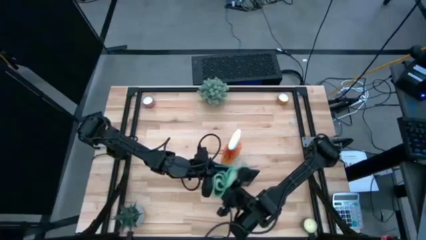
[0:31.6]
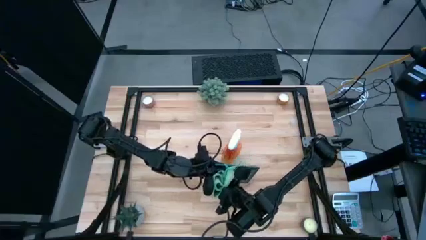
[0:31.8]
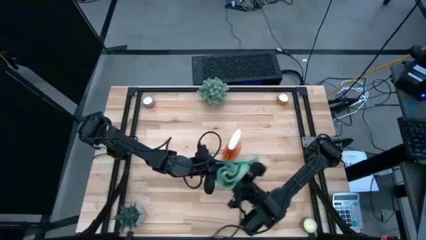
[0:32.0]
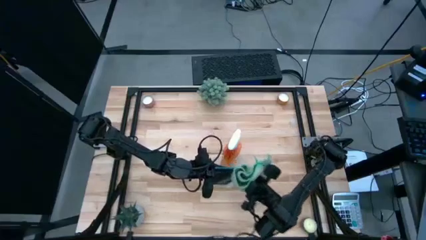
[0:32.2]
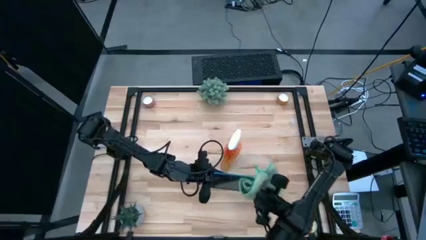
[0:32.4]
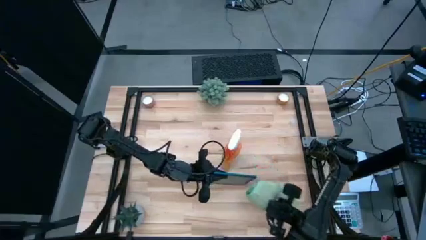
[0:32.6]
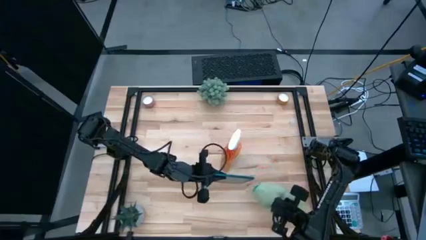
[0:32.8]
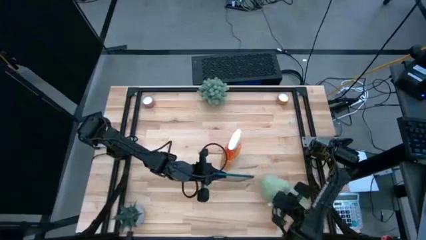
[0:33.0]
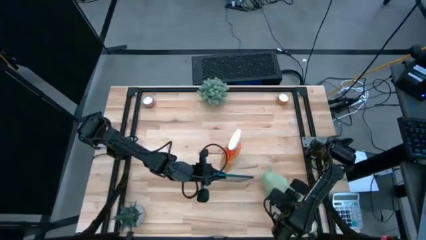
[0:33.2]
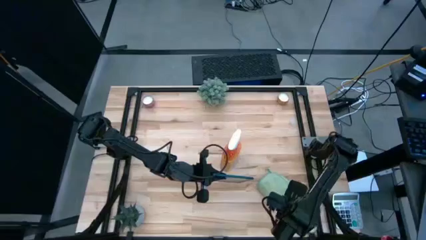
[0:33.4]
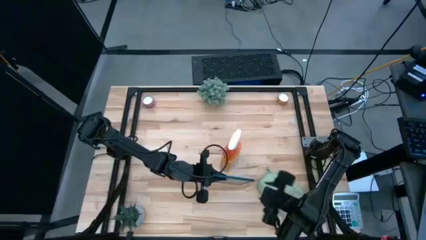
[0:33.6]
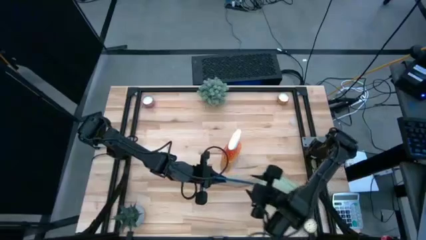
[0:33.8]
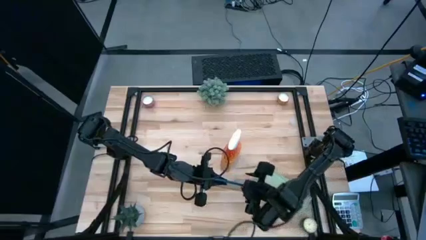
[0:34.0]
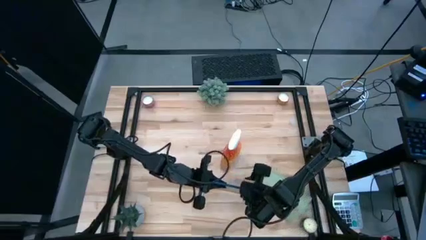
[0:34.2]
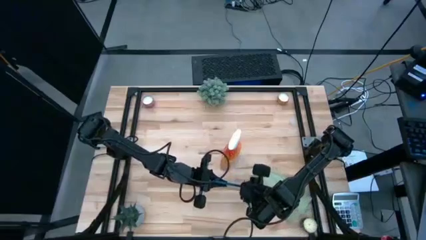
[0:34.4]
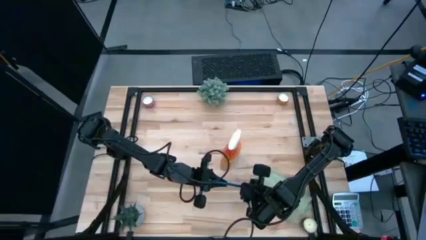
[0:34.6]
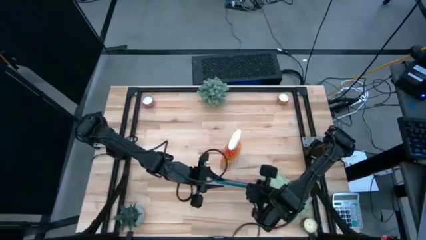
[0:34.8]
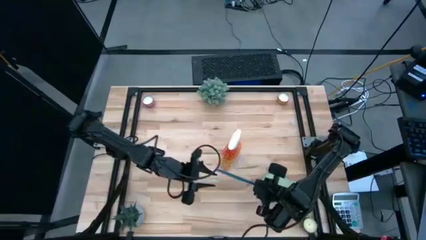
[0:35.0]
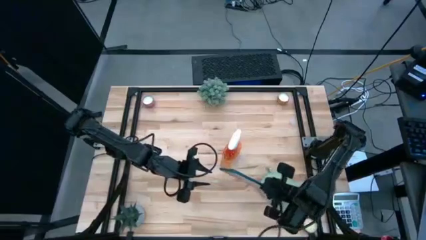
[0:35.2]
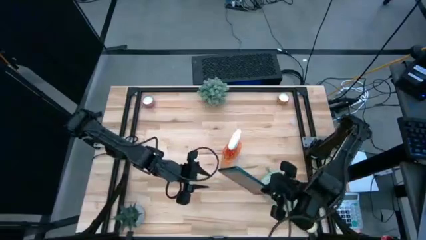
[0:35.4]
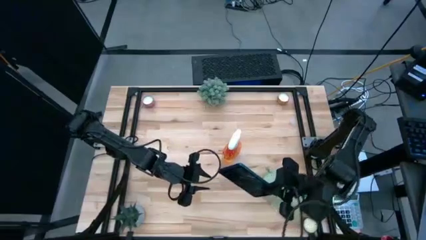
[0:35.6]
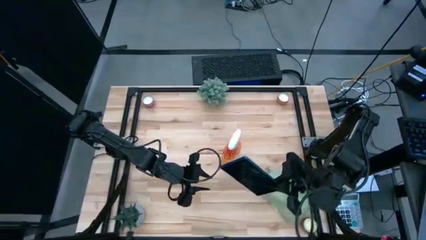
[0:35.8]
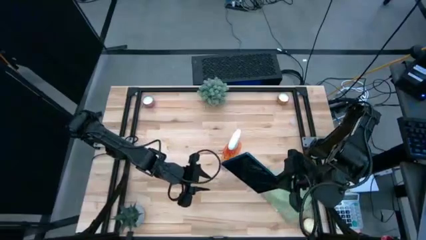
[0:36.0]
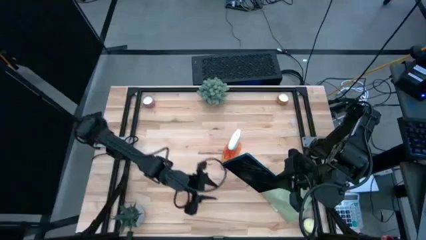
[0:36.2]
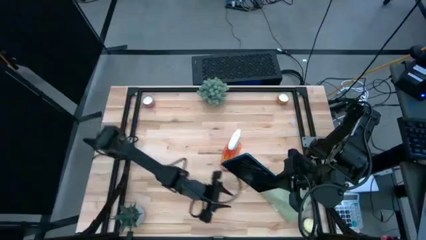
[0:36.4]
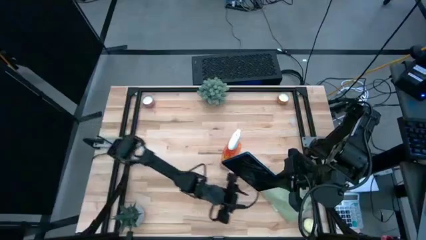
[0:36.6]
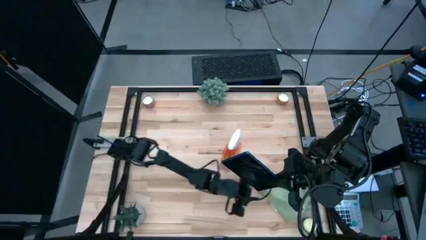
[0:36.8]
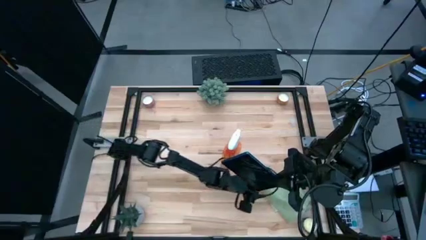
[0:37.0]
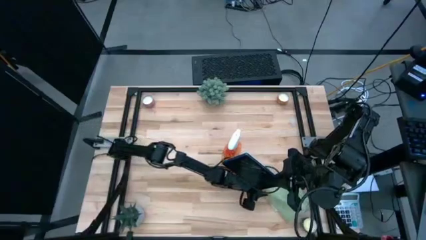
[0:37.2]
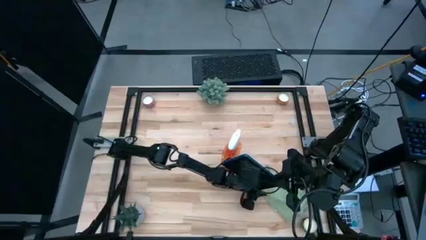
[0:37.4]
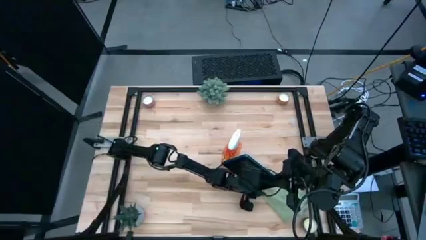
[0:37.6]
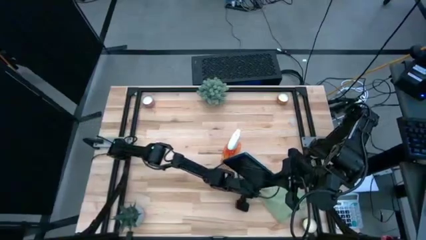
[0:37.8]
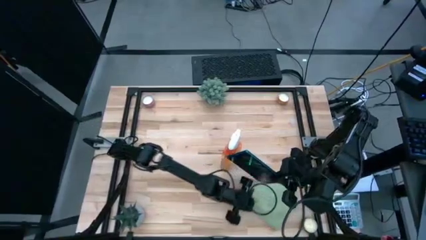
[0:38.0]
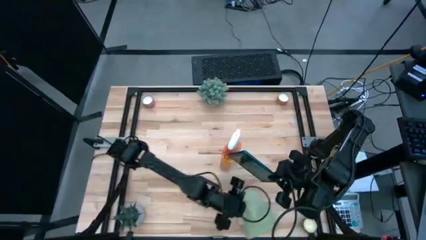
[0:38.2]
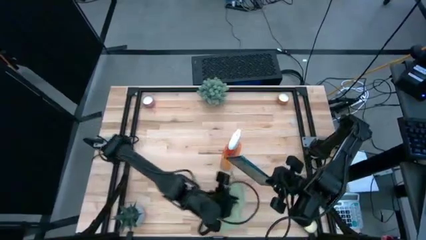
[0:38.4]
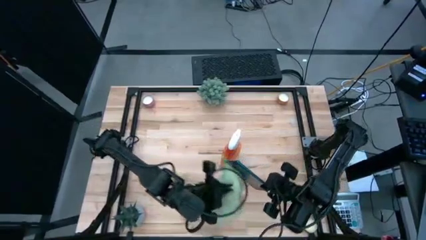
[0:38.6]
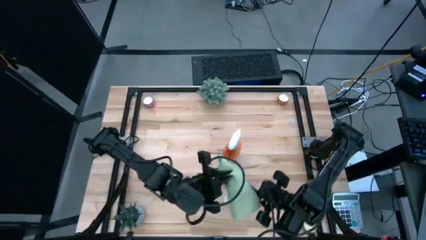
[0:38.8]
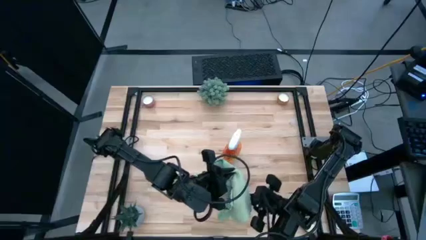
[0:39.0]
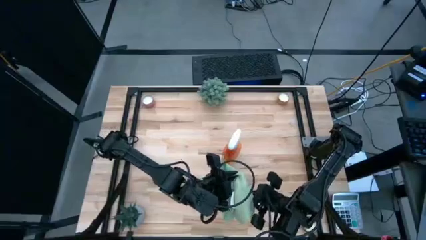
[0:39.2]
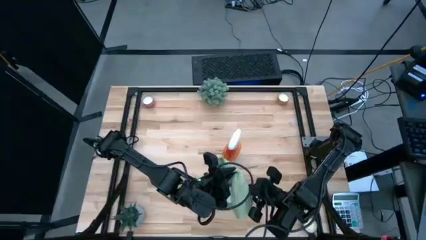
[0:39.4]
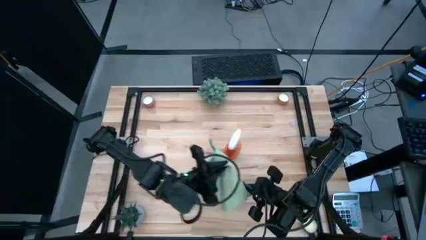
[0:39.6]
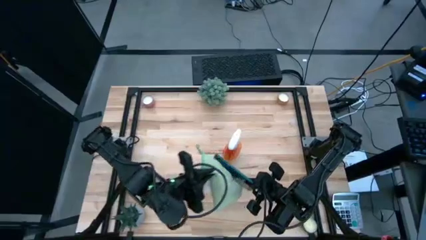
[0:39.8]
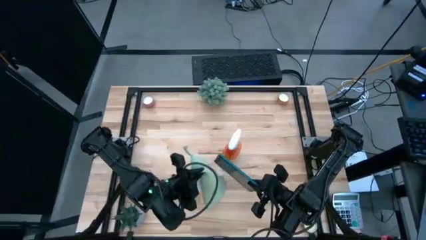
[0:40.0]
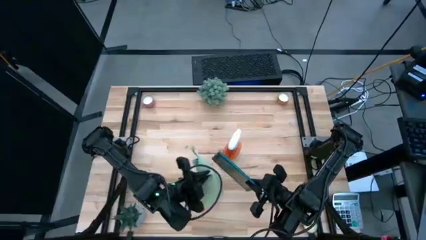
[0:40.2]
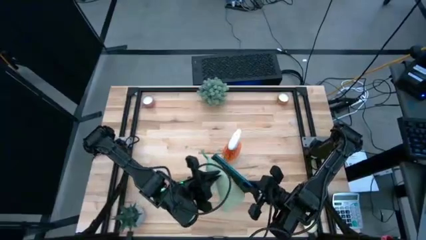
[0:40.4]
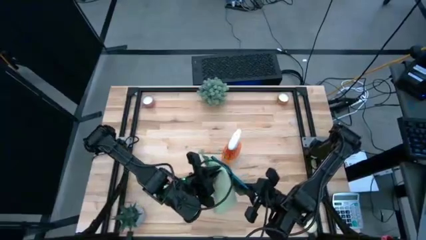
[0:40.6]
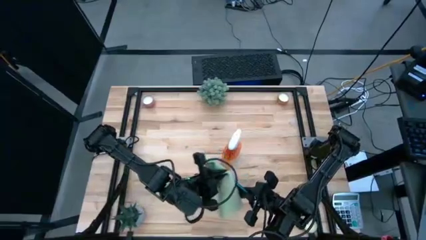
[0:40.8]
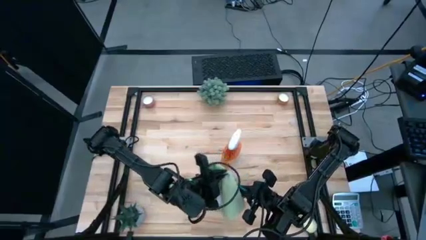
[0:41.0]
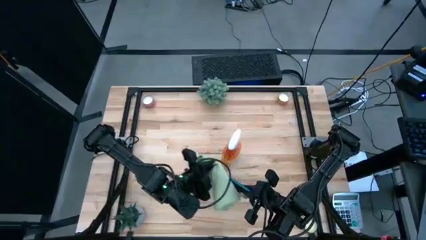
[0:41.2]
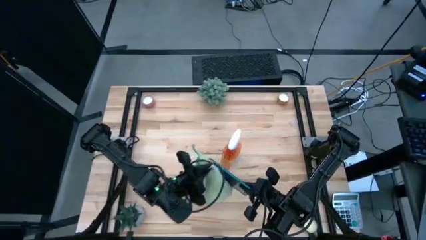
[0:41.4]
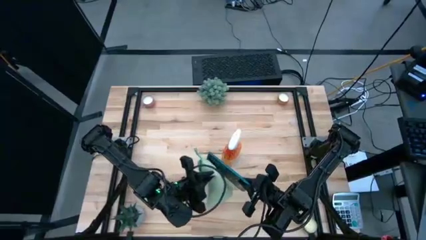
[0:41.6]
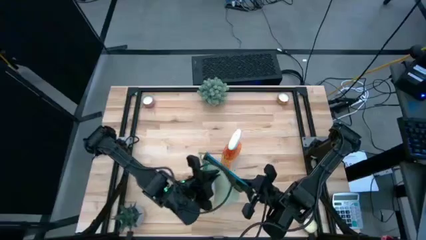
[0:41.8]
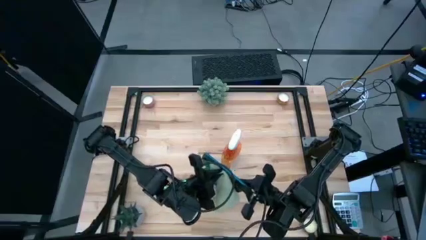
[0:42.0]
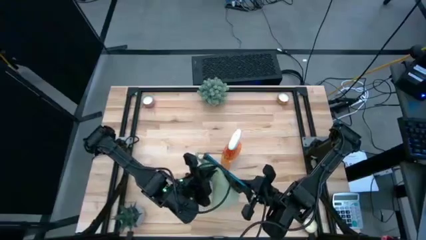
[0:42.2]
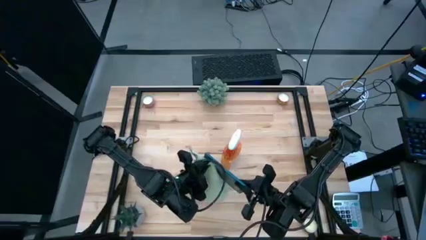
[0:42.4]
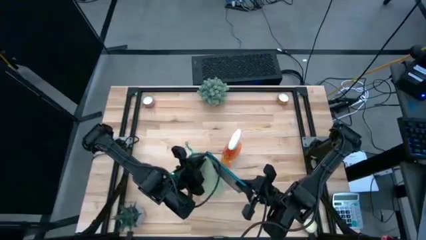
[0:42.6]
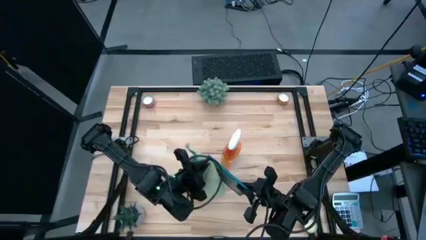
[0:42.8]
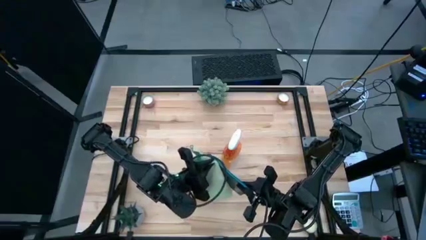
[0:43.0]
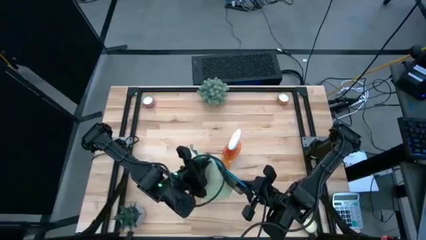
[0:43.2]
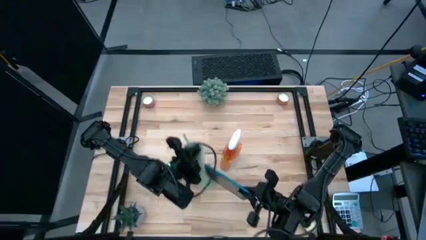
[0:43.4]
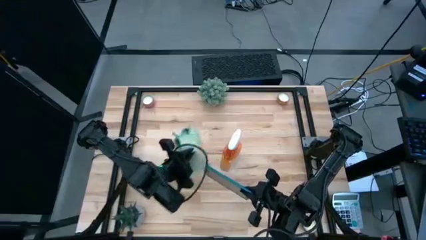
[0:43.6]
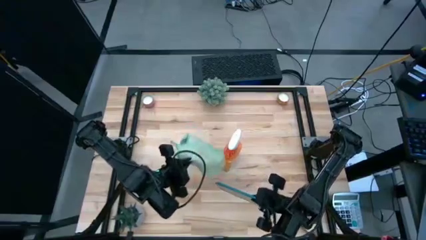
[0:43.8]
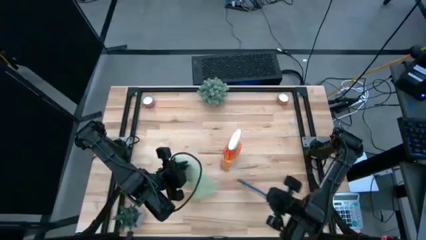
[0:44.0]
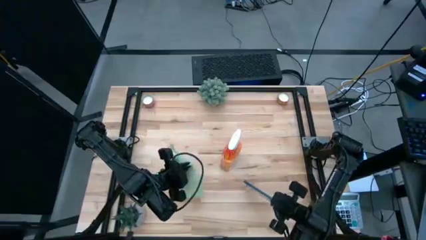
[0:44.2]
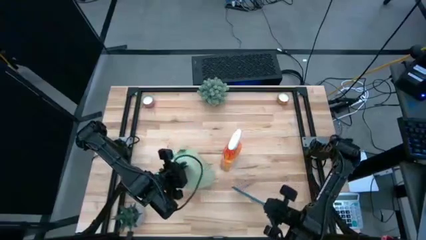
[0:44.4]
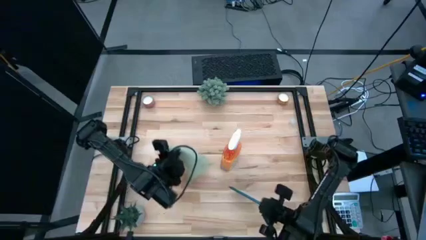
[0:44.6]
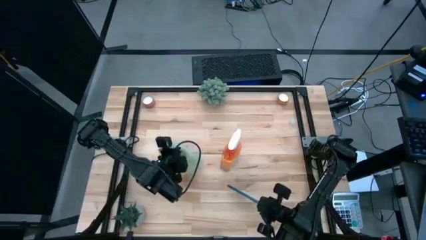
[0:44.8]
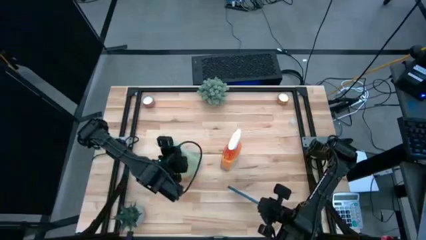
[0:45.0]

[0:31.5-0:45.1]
Task: Apply microfiber cloth
Wipe the front of the blue tablet with the green microfiber cloth
